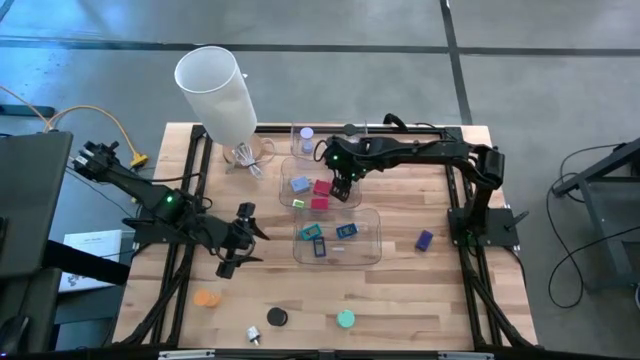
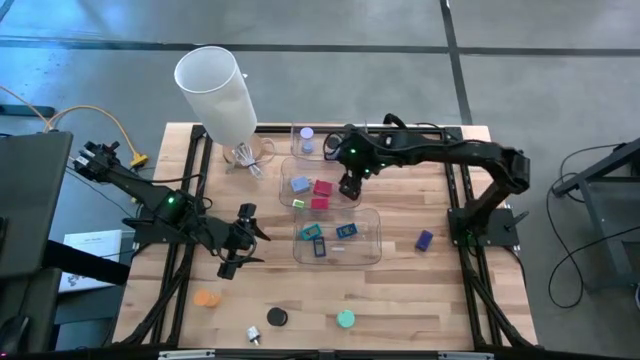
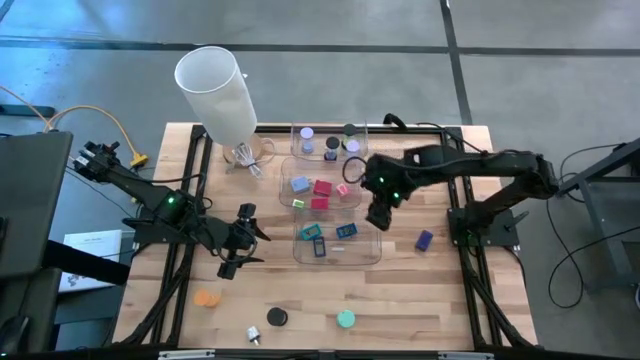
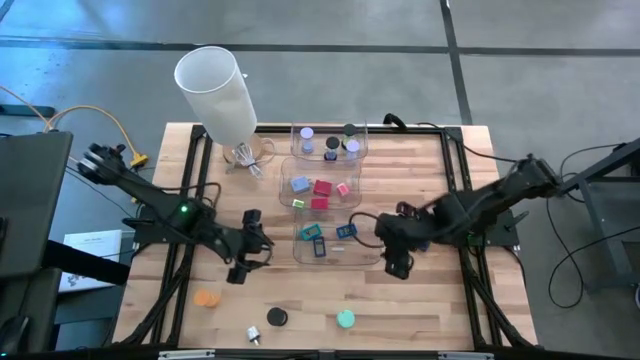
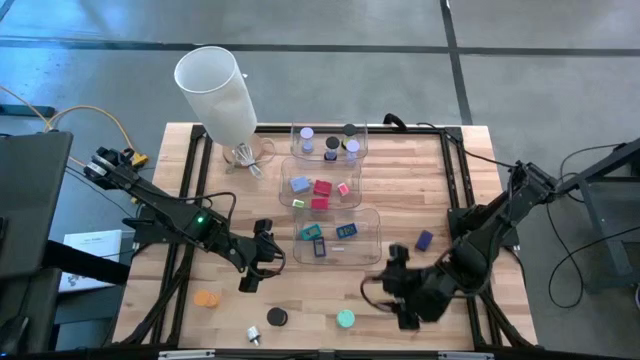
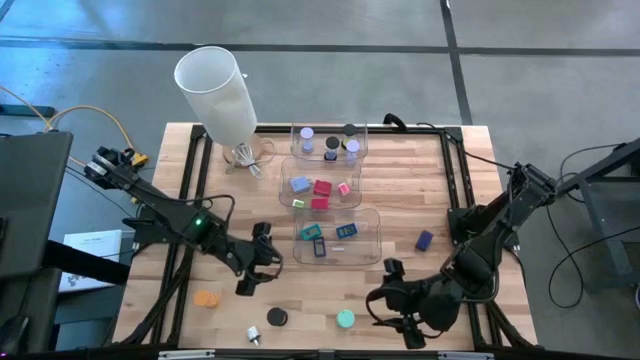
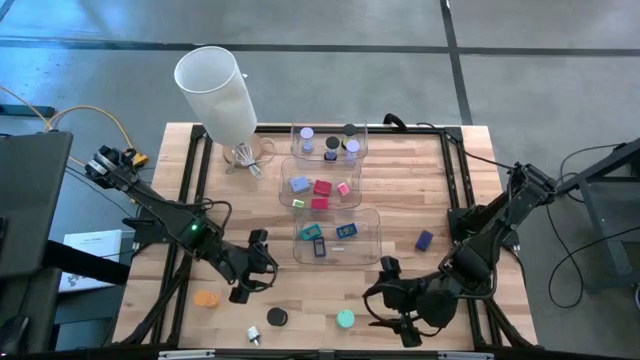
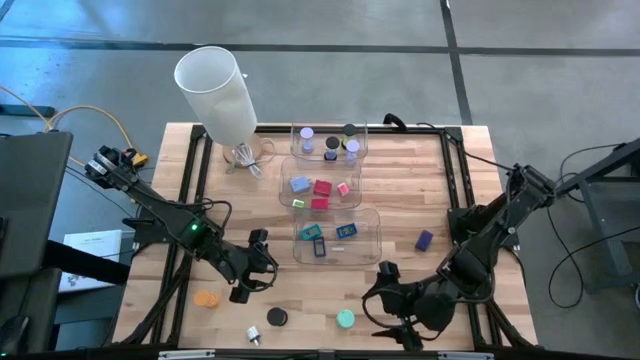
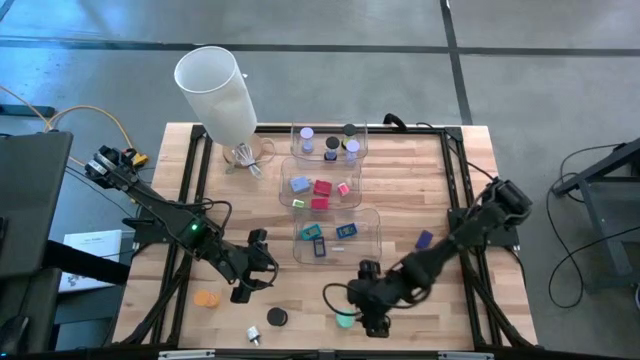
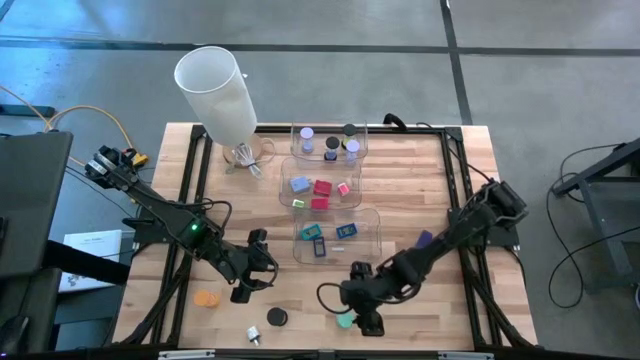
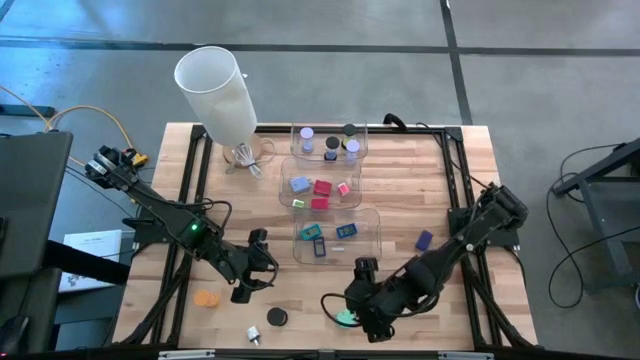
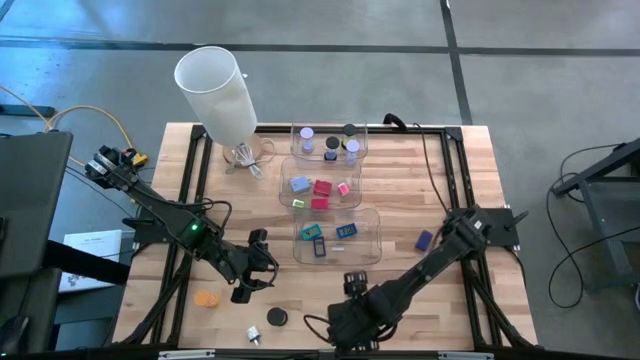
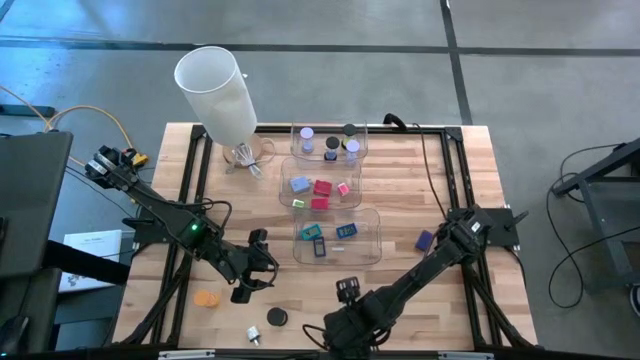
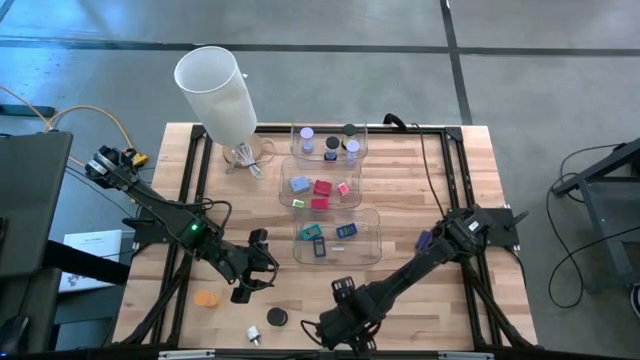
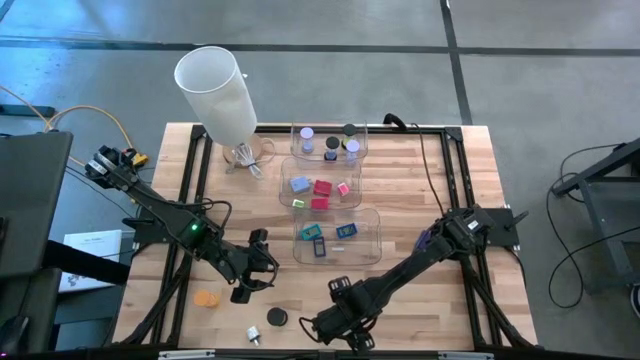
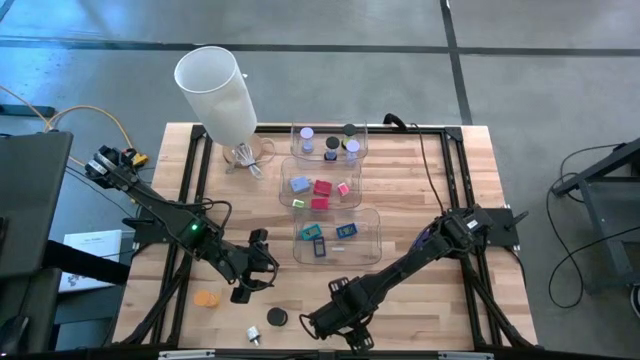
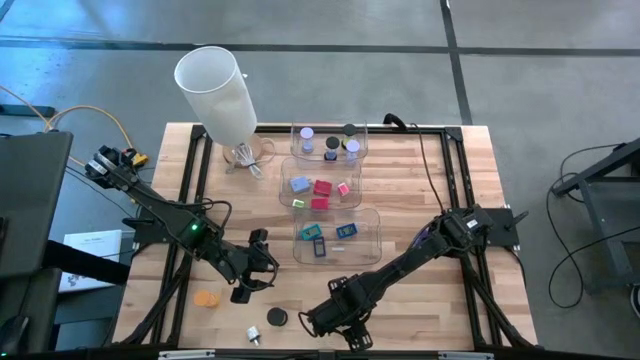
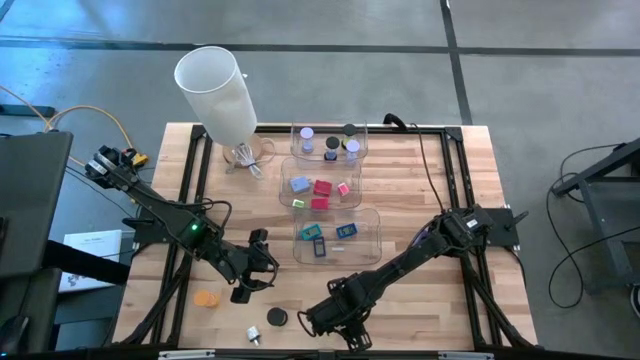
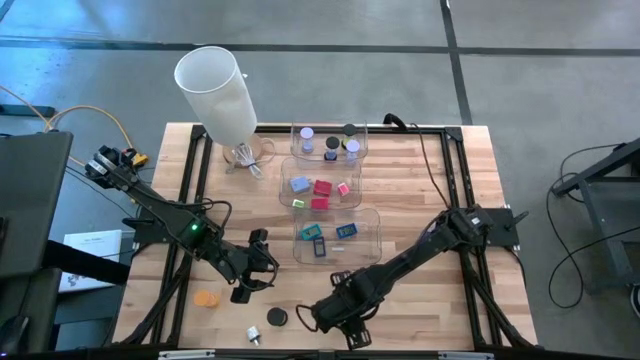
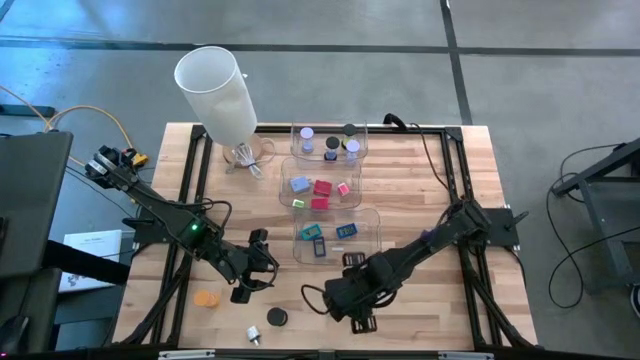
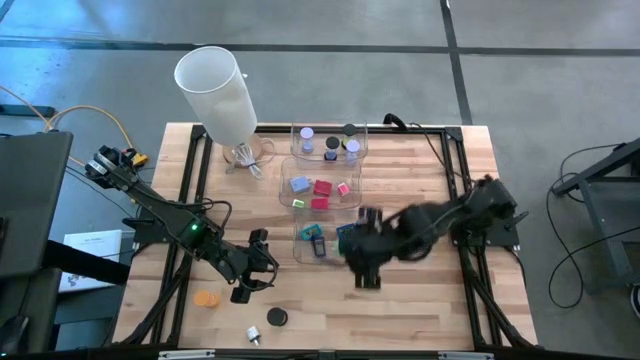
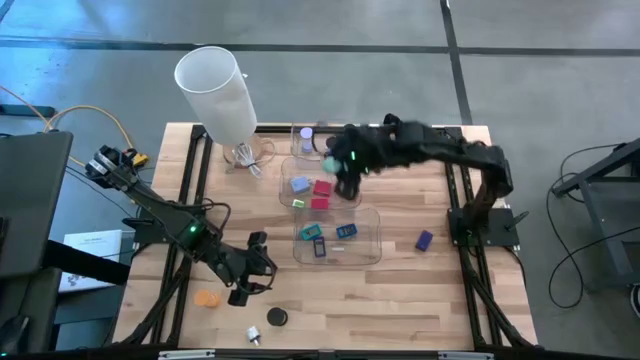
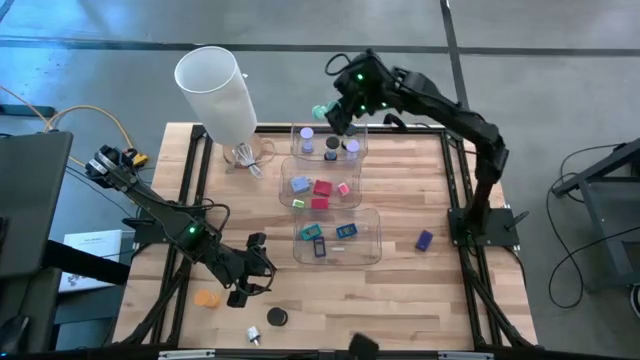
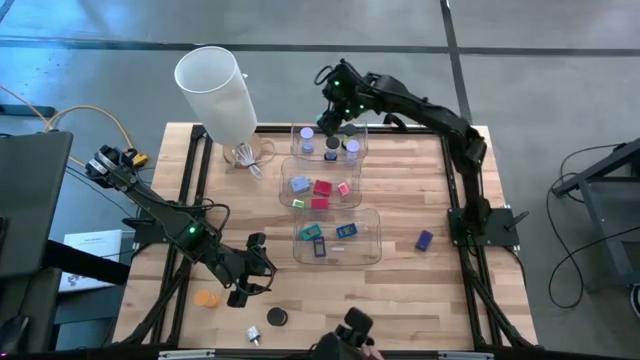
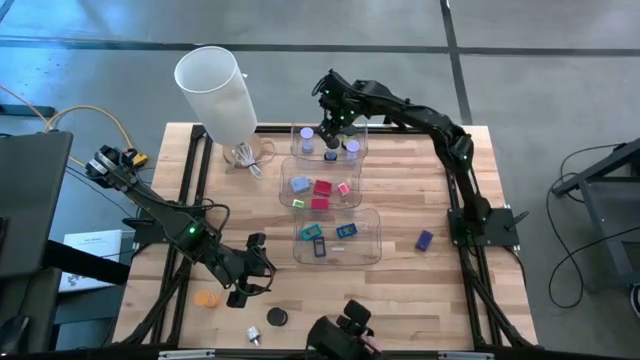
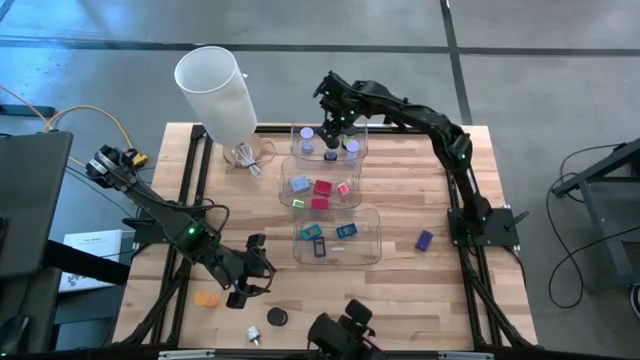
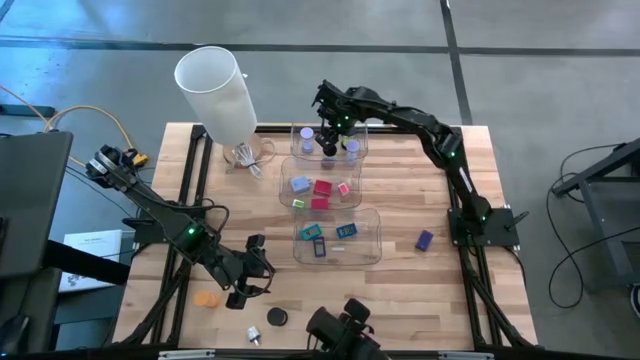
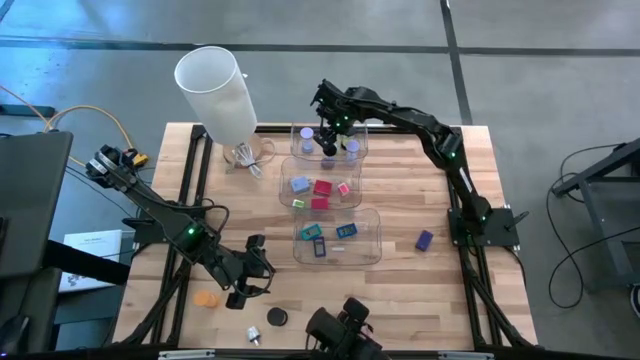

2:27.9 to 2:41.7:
Task: Pick & Place Office items
Put the light blue hourglass into the top transparent bin

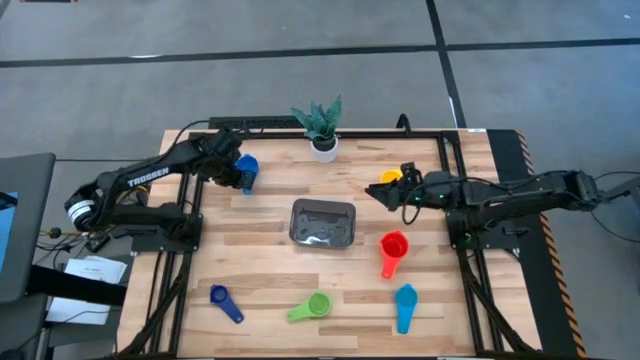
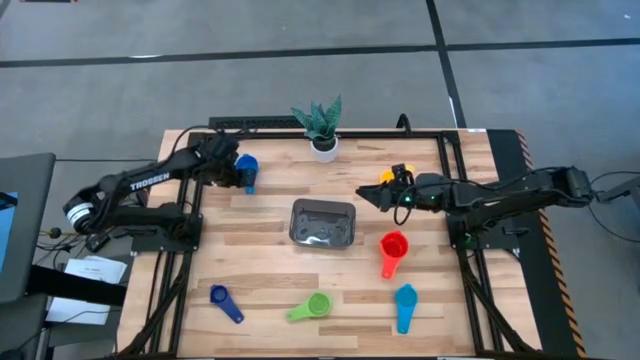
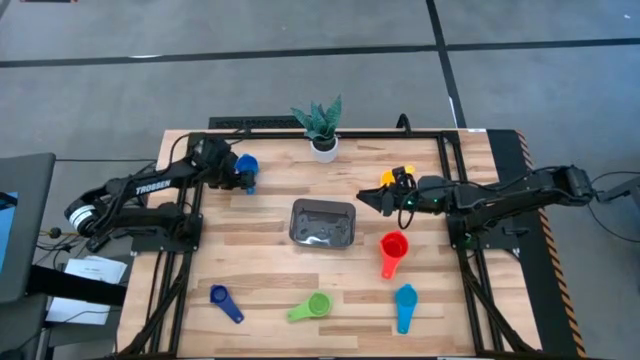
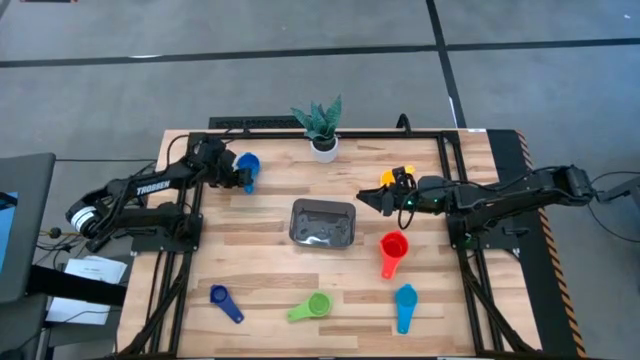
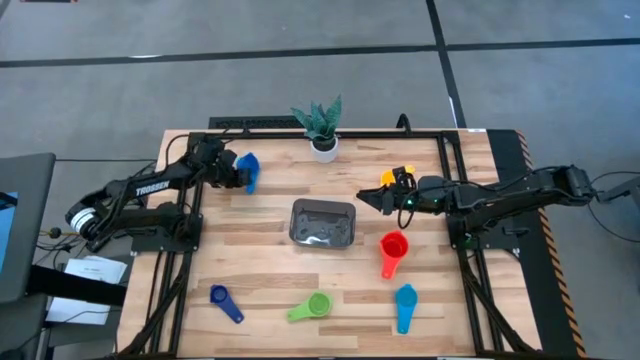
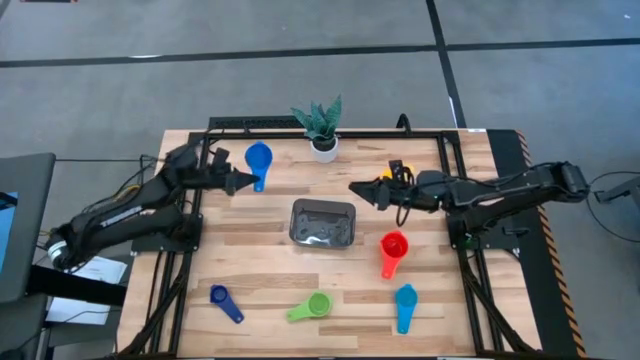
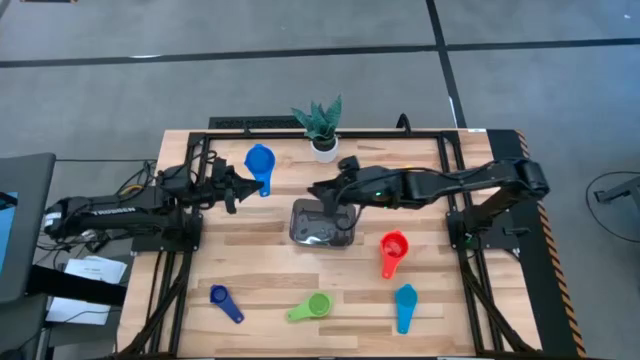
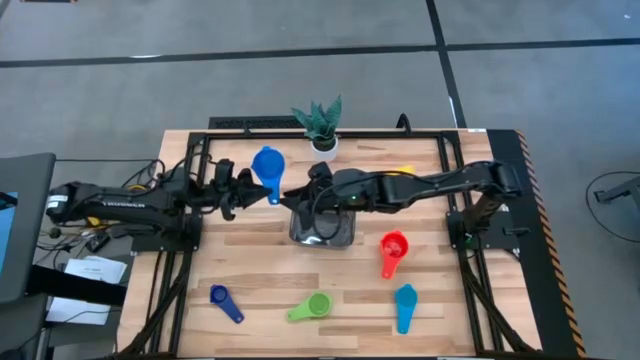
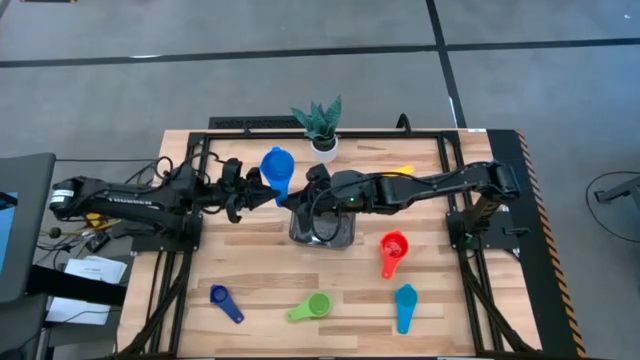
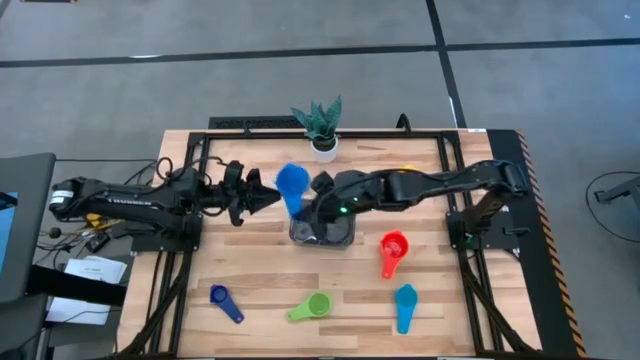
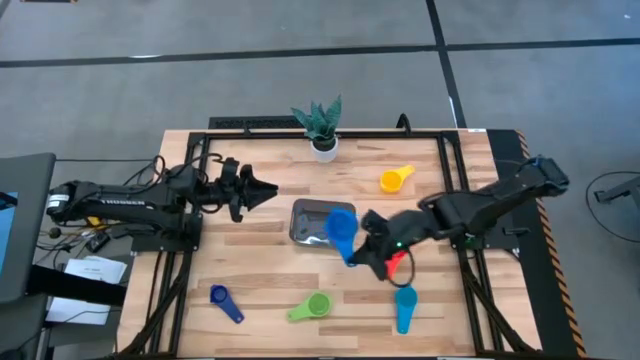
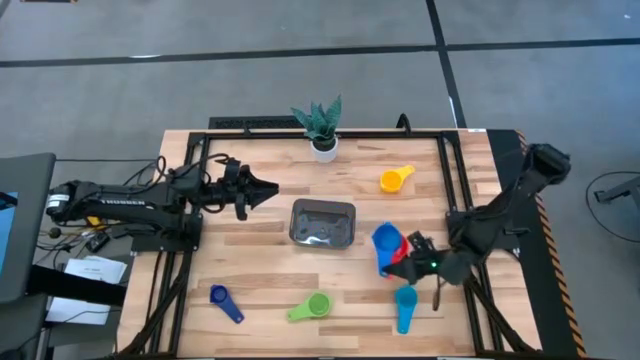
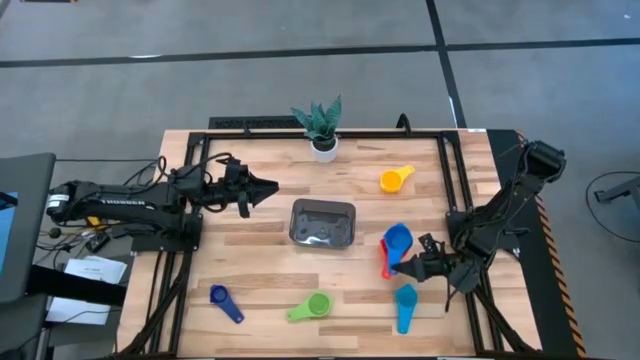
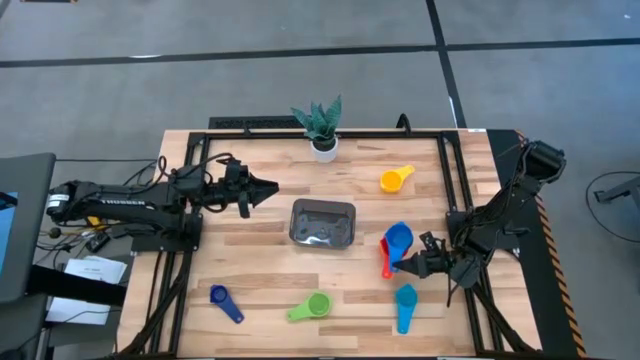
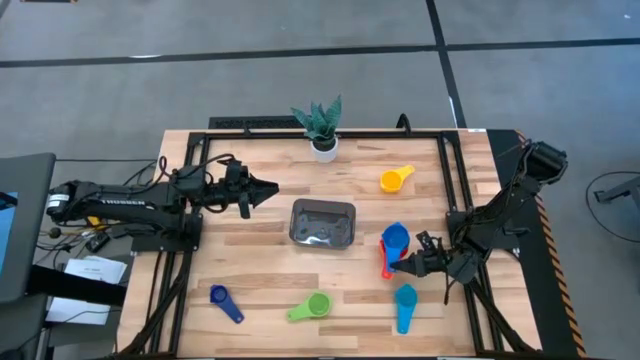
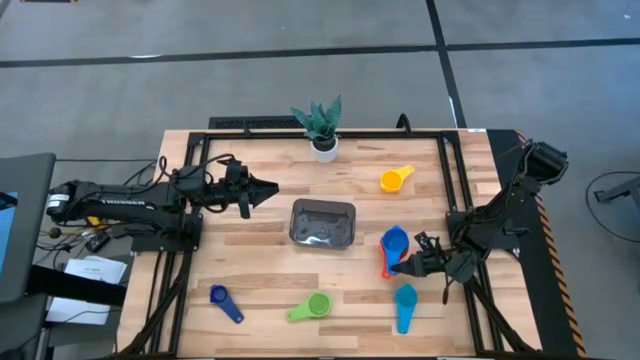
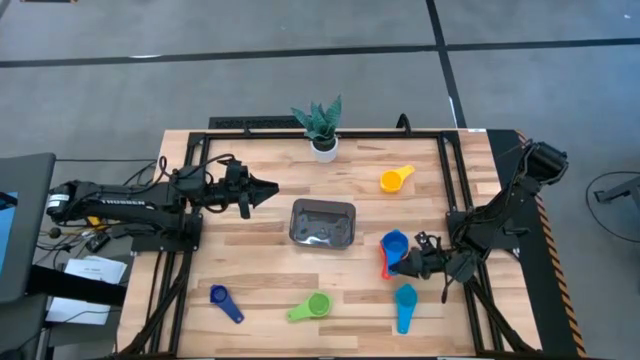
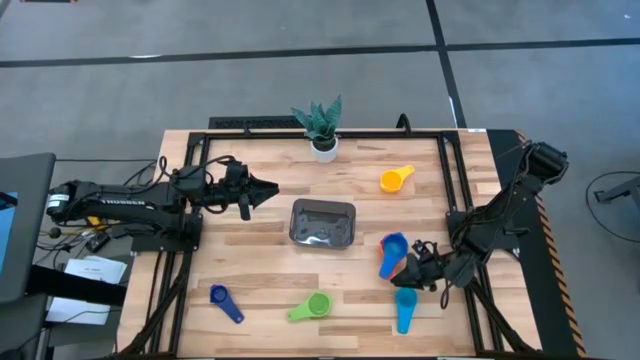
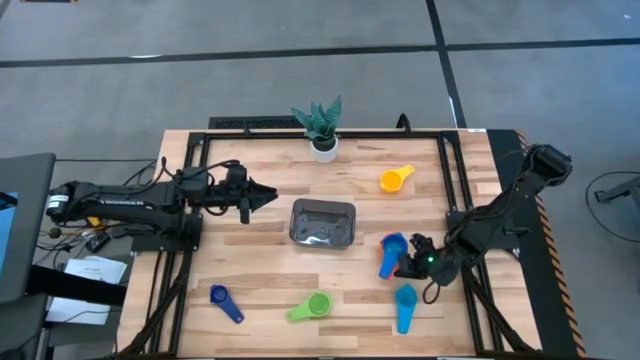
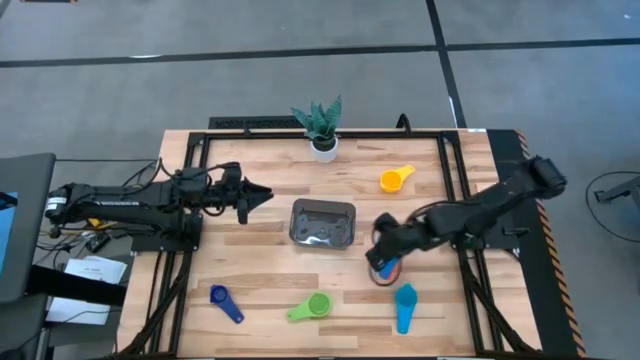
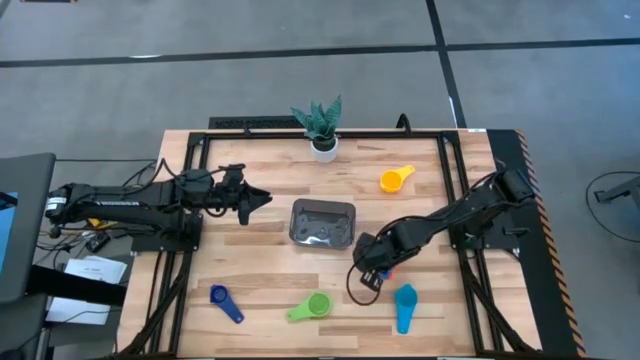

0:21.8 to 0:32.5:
Task: Nest measuring cups in basket
Stack the blue measuring cup on top of the red measuring cup
